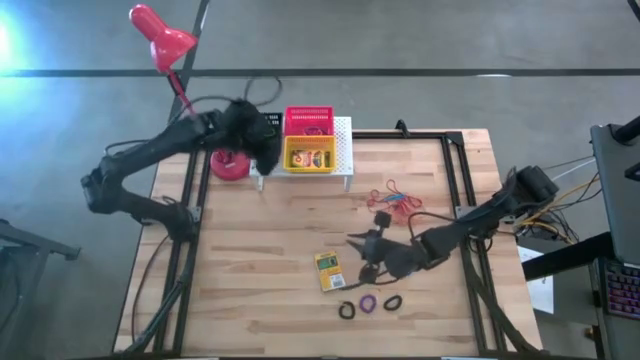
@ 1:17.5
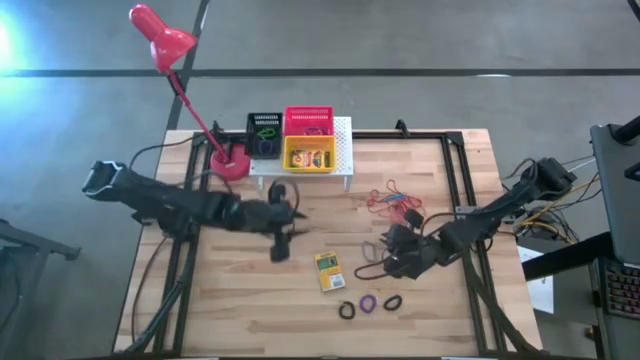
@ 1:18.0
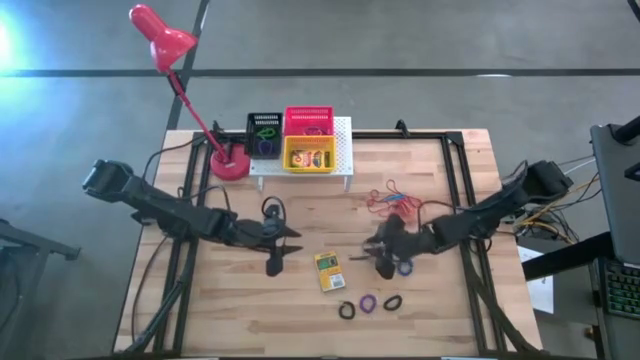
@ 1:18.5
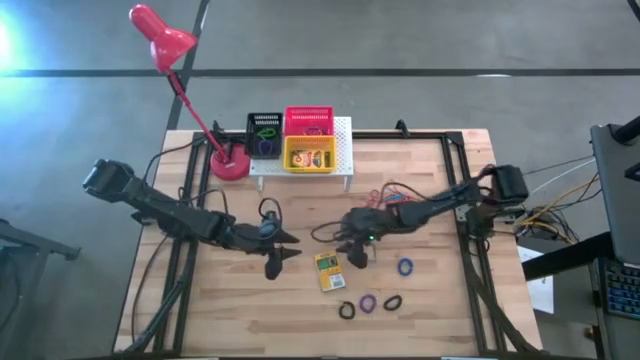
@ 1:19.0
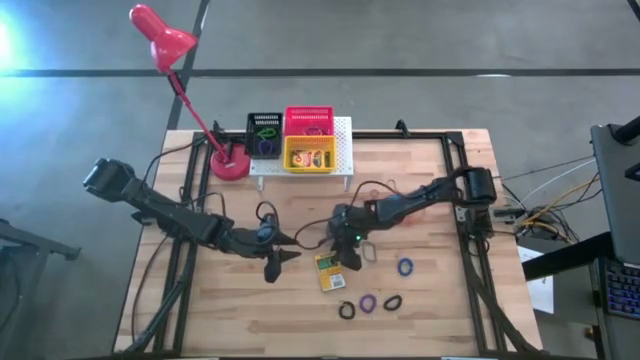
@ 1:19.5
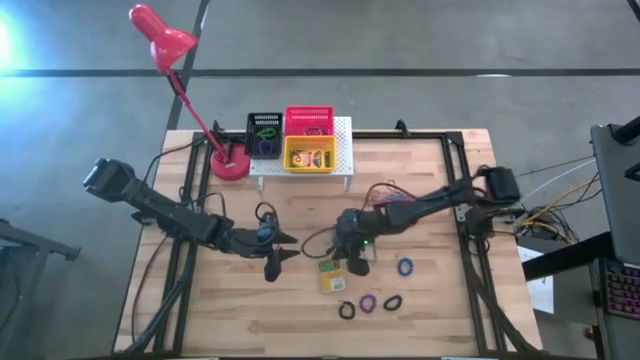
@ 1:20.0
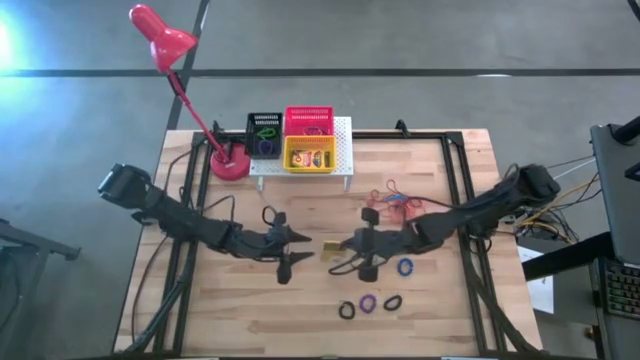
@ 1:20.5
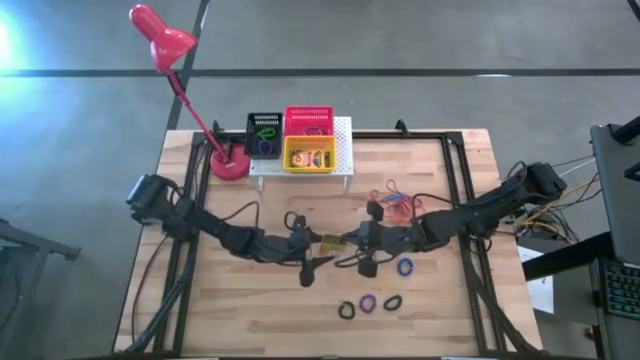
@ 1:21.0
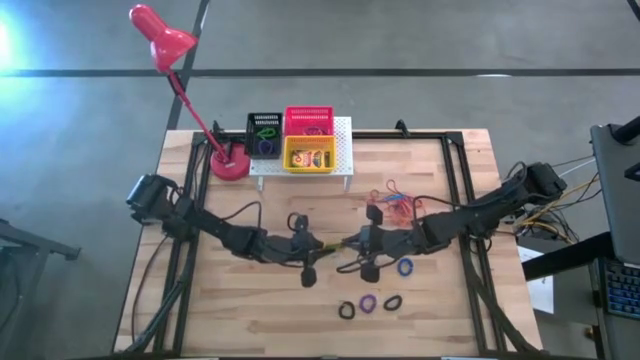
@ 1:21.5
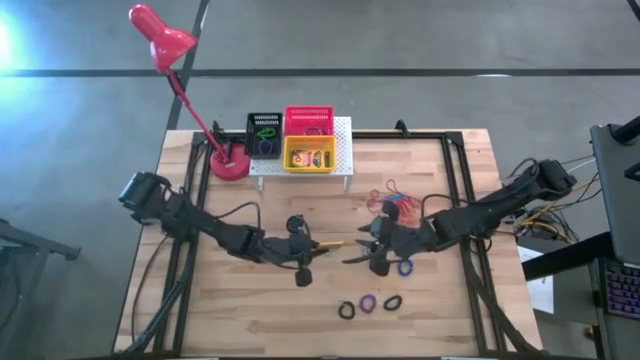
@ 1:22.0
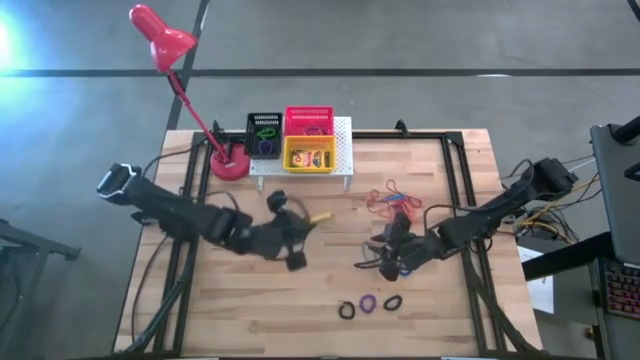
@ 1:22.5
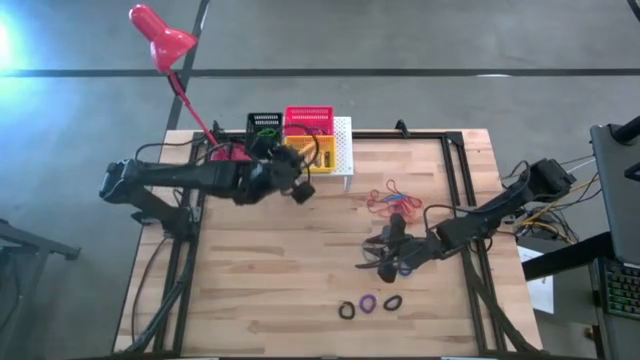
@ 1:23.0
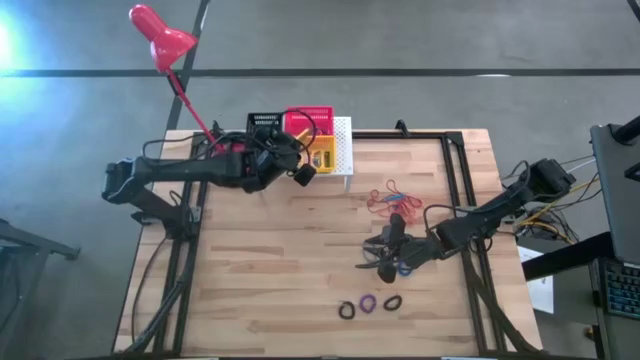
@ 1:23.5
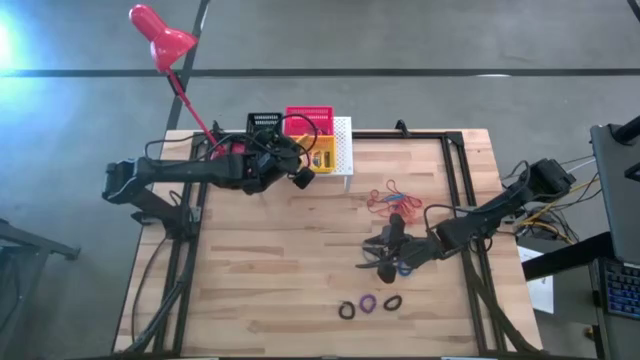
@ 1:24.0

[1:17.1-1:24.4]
Task: Pick & Place Office Desk Supplies
Put the yellow crayon box into the yellow bin on the shelf

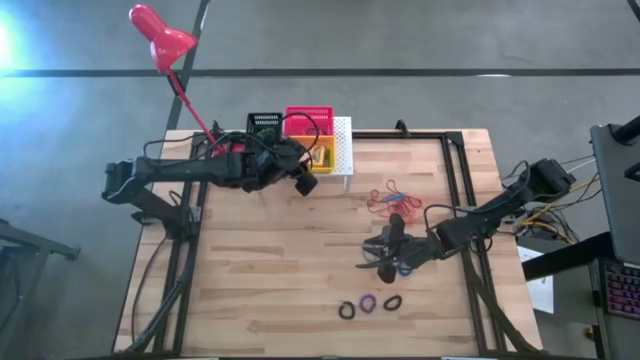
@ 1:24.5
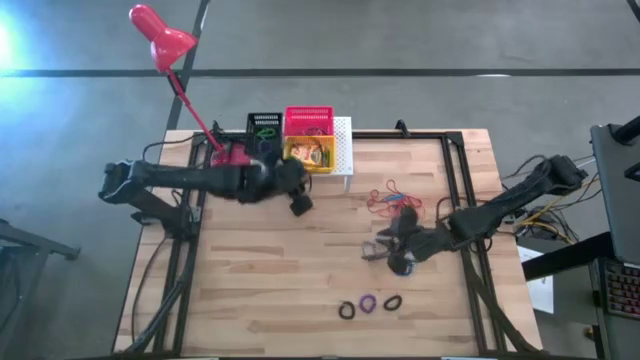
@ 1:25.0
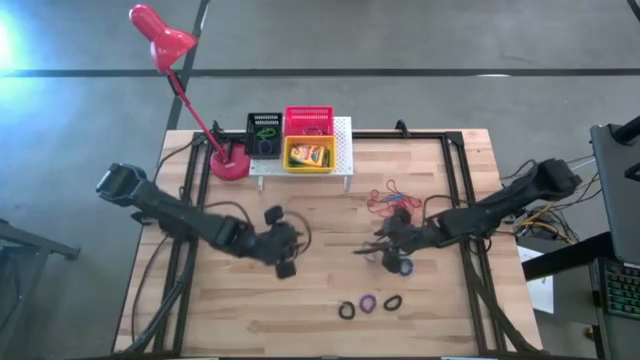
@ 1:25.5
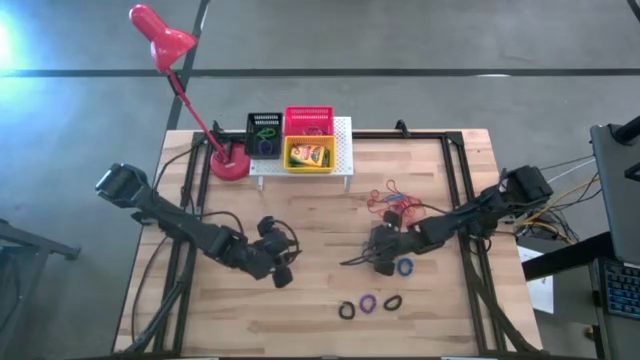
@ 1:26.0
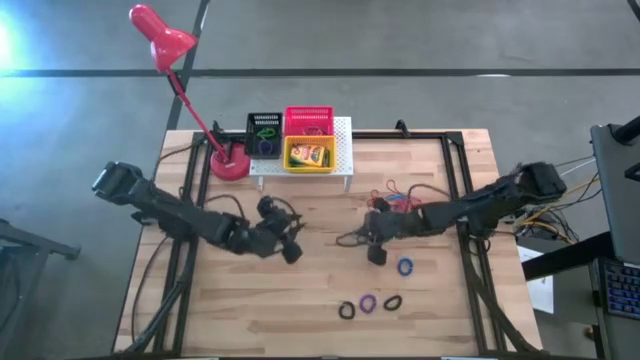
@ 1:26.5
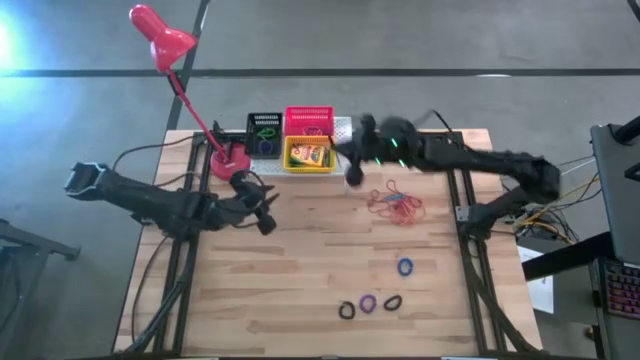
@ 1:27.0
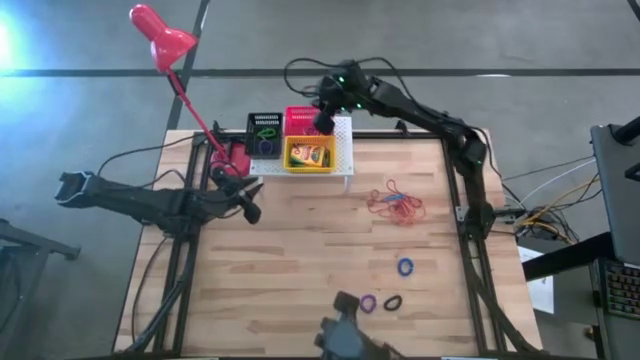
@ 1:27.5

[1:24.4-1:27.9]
Put the blue rubber band into the red bin on the shelf on the shelf

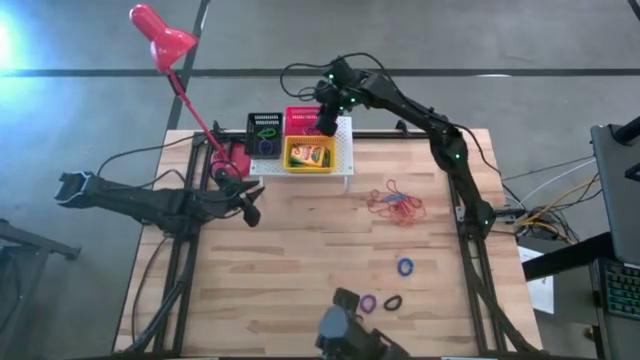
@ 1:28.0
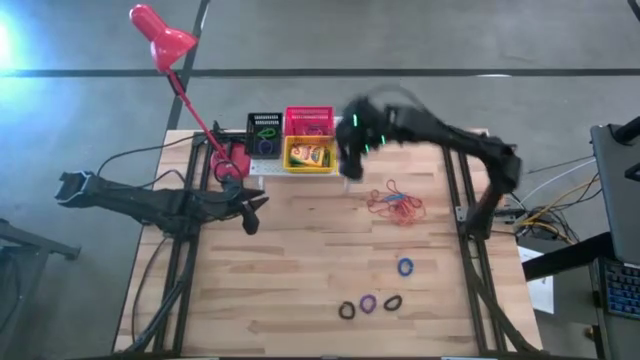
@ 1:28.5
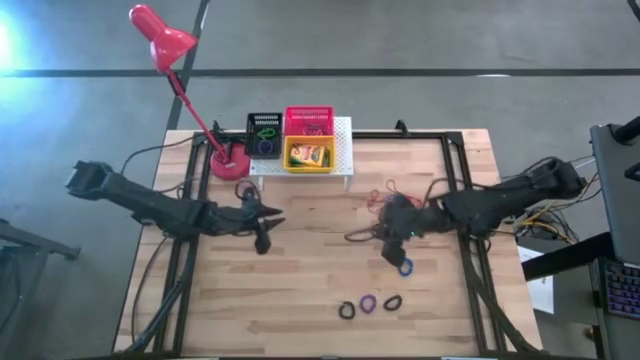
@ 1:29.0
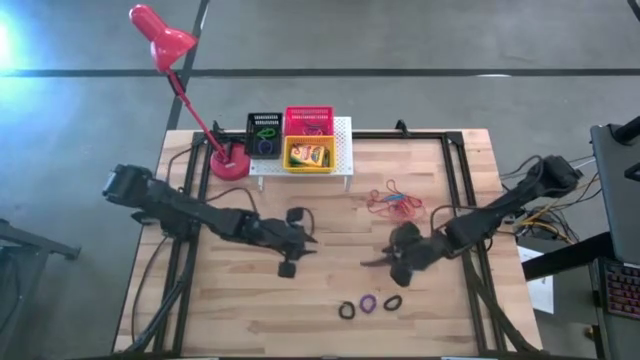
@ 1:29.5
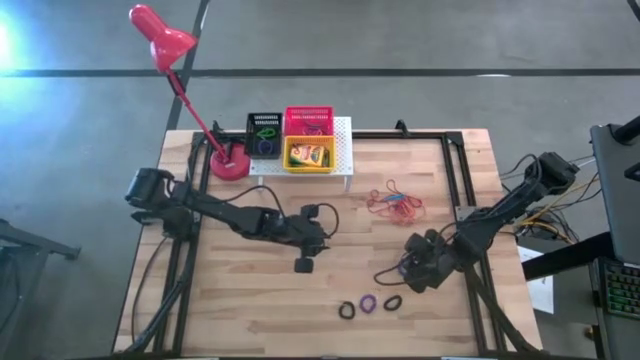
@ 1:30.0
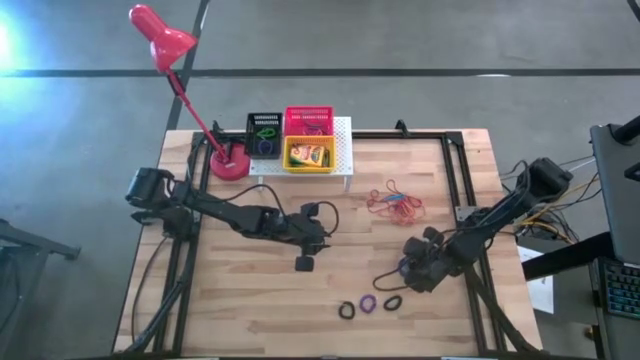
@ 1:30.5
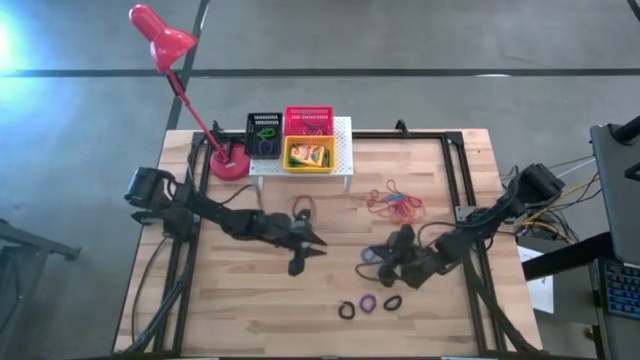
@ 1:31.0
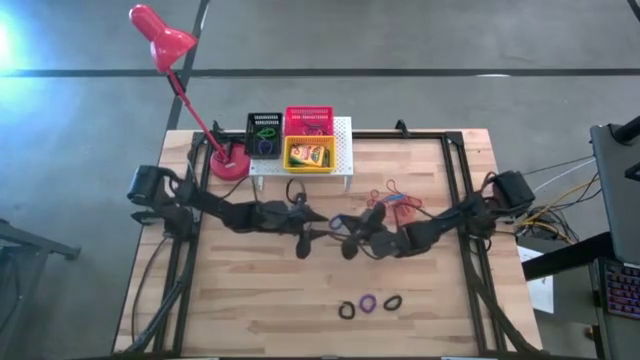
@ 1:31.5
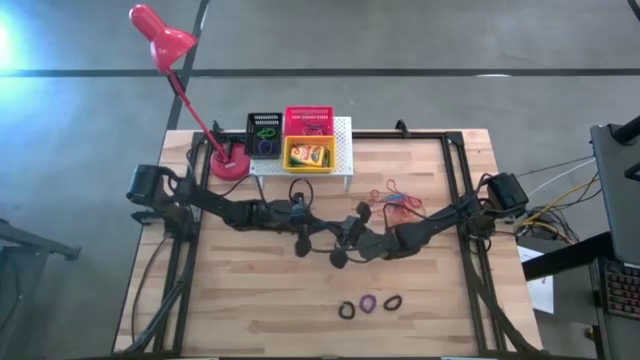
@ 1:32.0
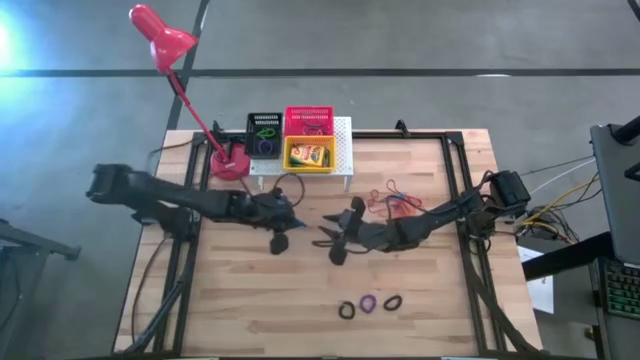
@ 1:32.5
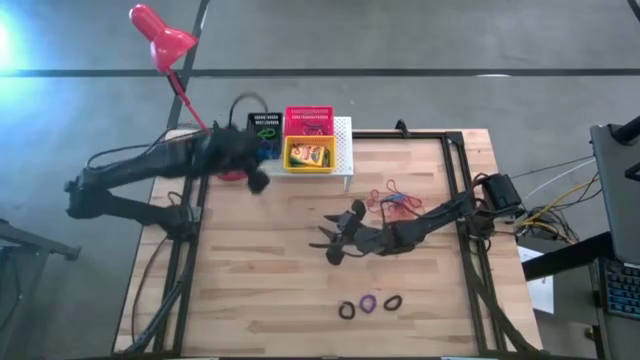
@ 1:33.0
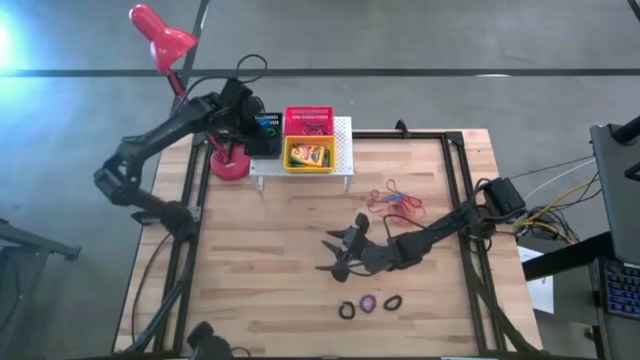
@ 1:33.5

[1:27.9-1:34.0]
Put the blue spring keychain into the black bin on the shelf

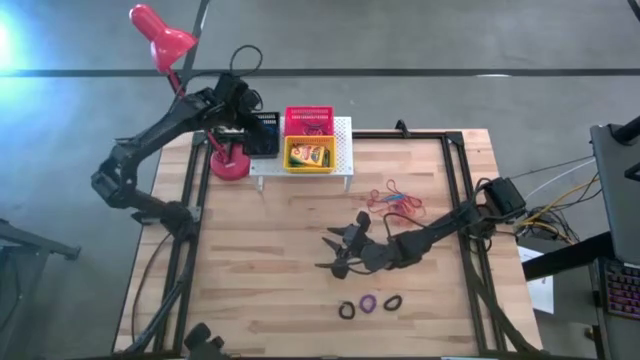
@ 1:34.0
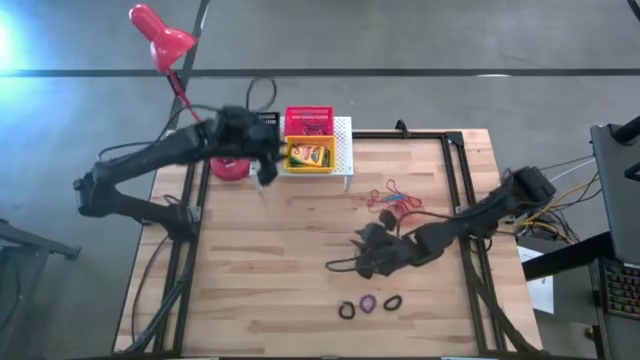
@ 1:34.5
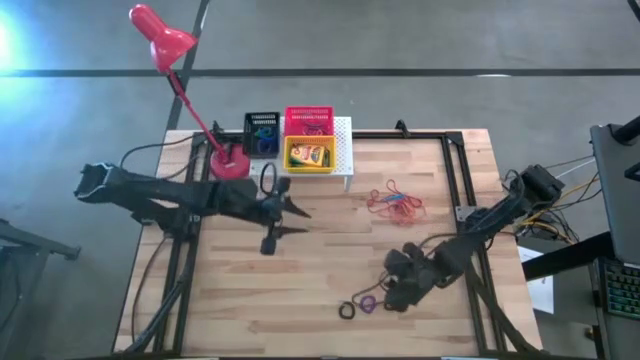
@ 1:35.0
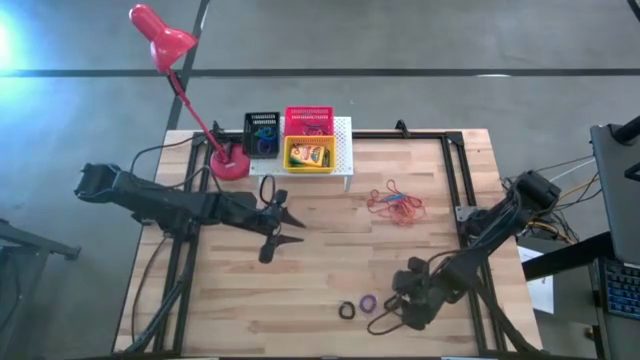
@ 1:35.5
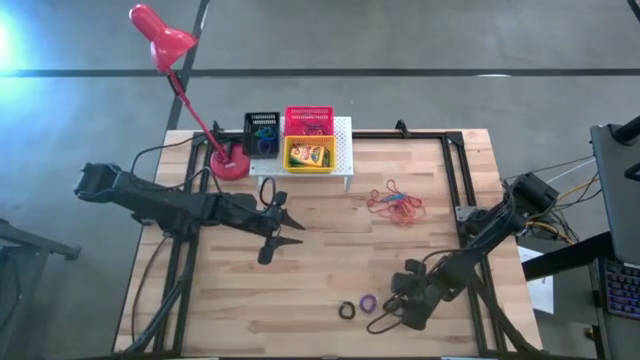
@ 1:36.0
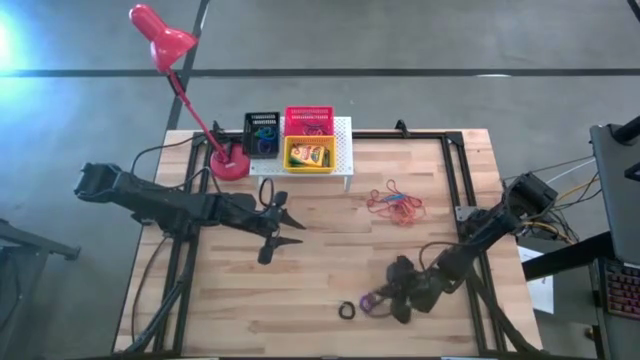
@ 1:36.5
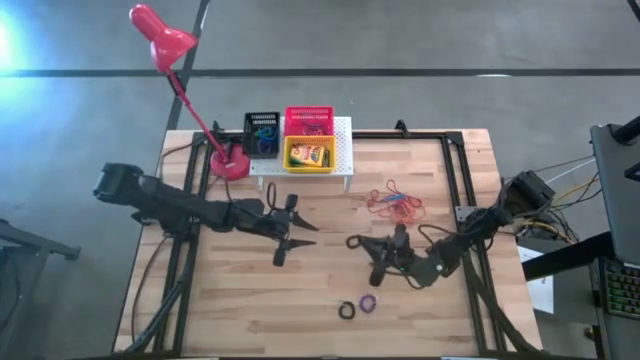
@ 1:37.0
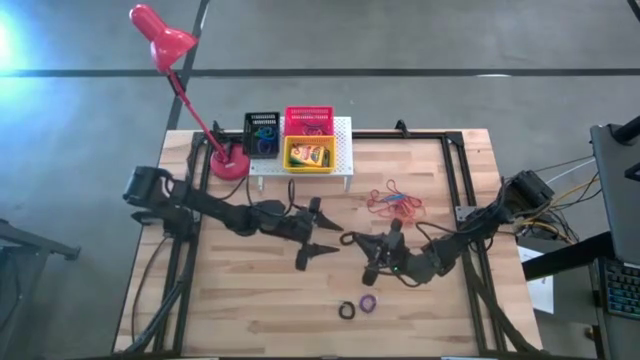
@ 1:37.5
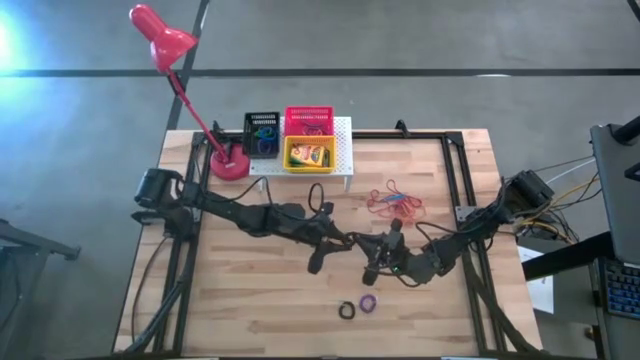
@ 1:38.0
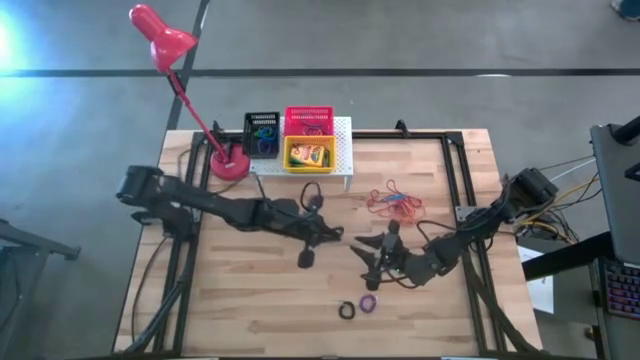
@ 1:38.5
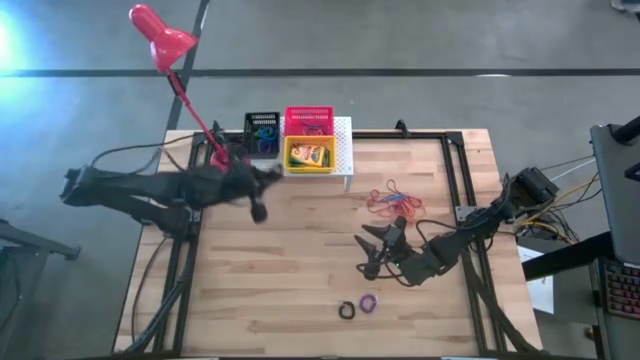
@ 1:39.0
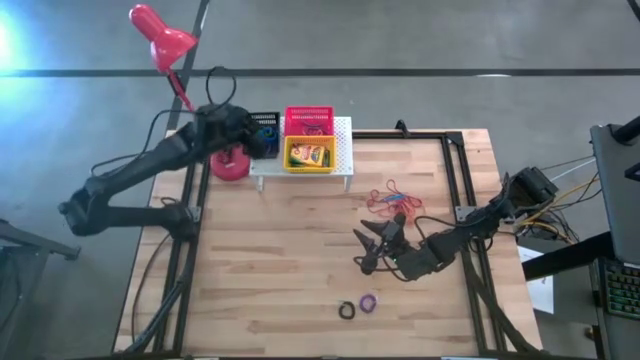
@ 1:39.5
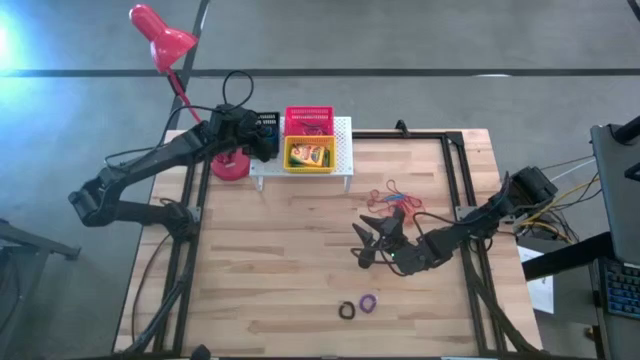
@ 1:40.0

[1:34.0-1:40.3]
Put the right black spring keychain into the black bin on the shelf
